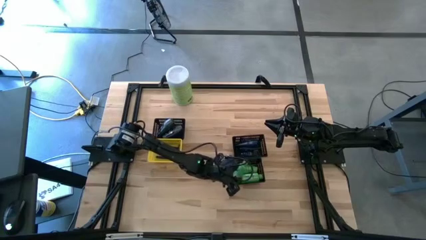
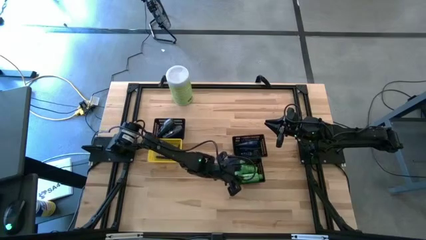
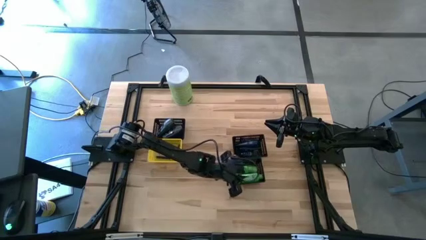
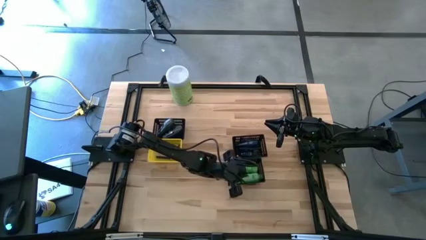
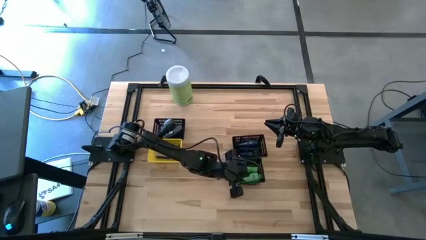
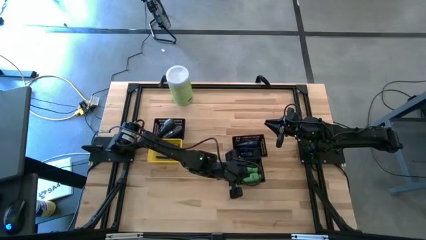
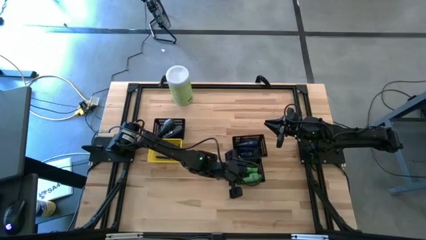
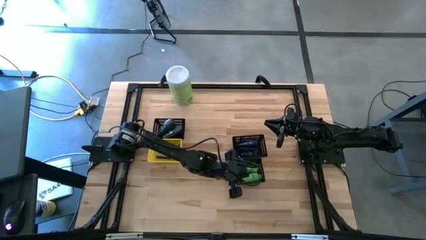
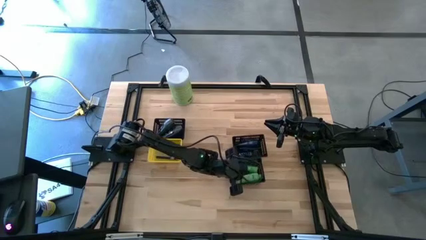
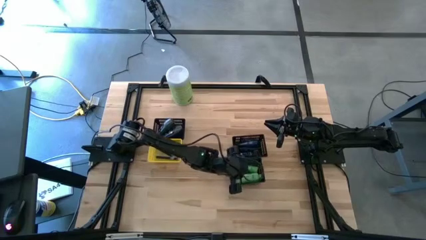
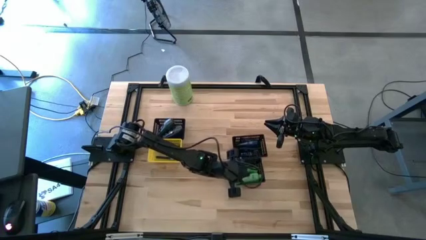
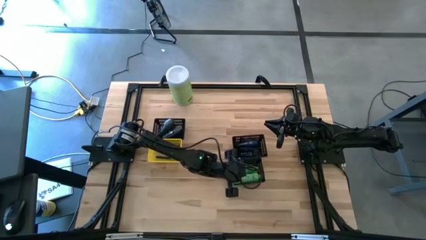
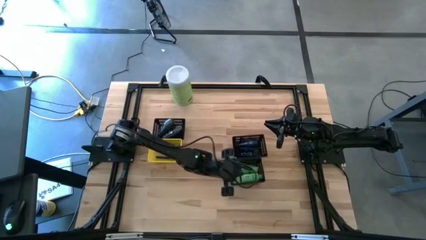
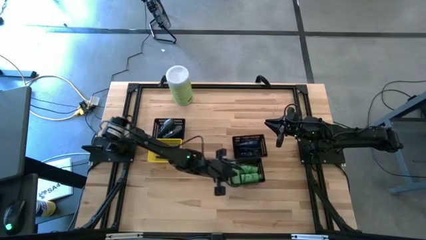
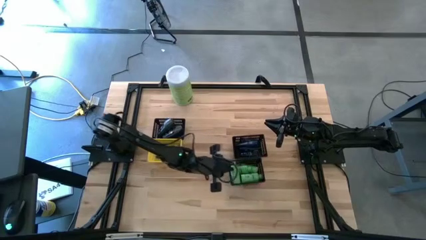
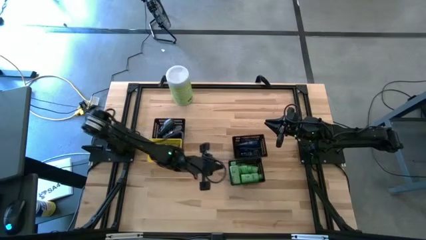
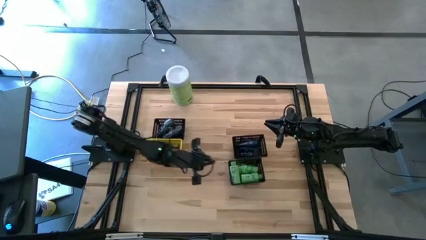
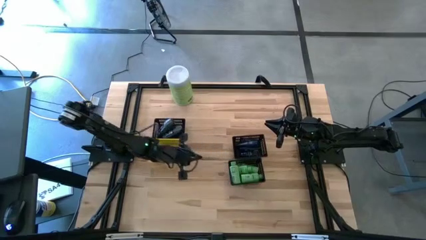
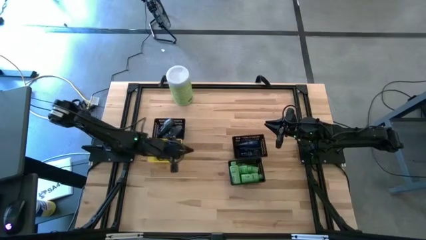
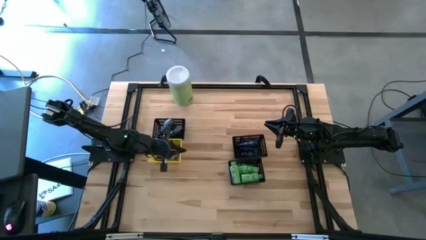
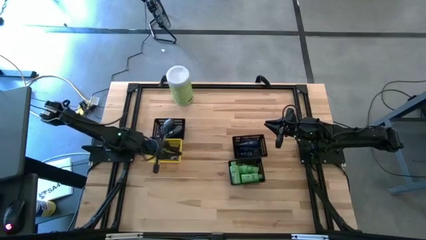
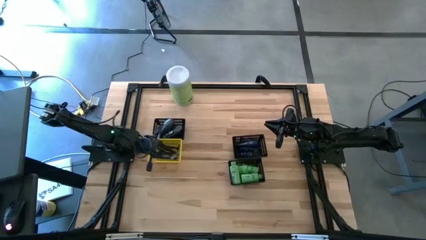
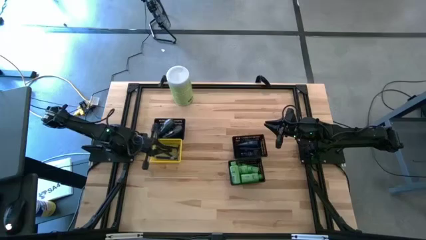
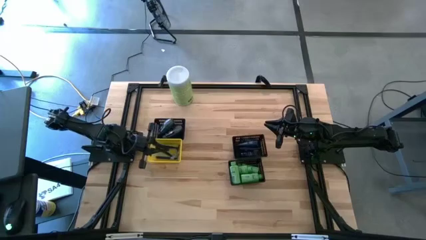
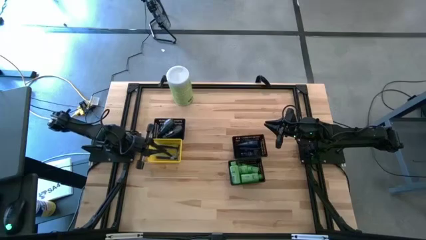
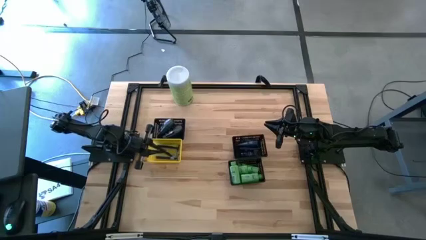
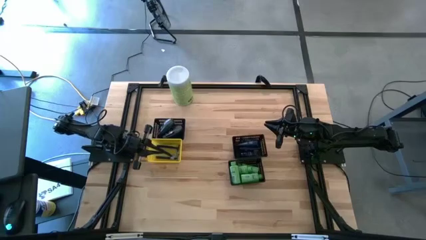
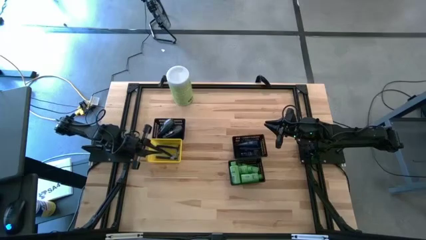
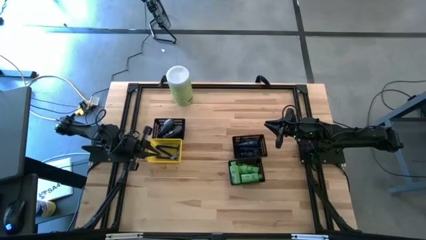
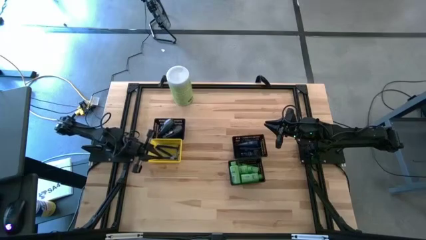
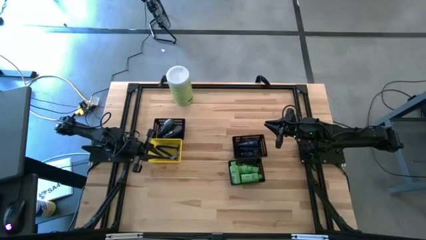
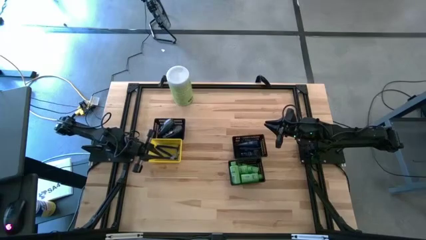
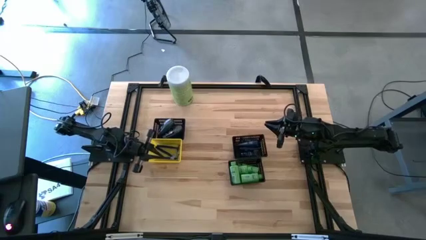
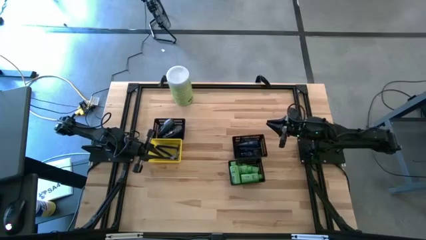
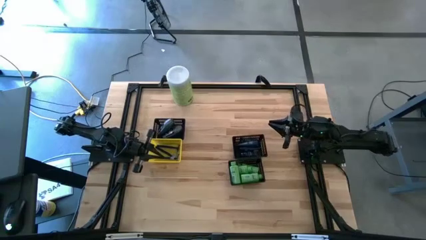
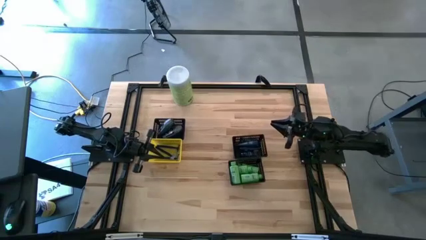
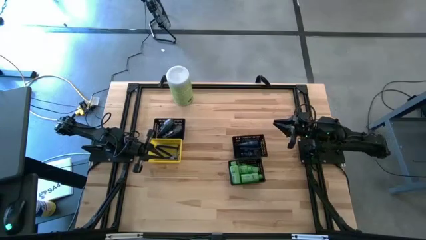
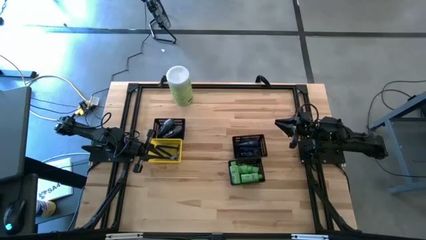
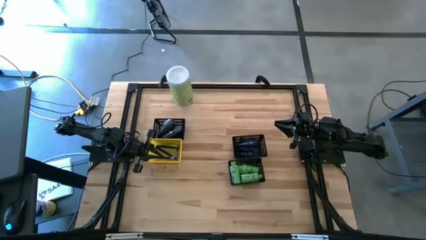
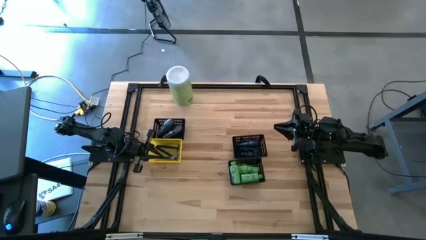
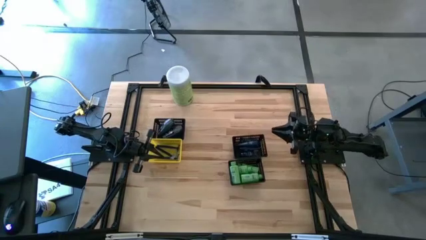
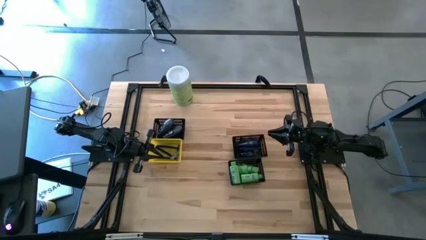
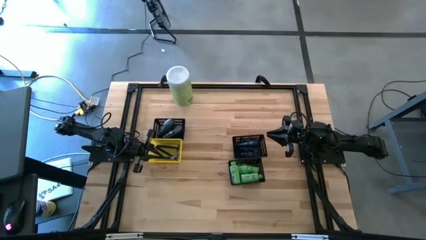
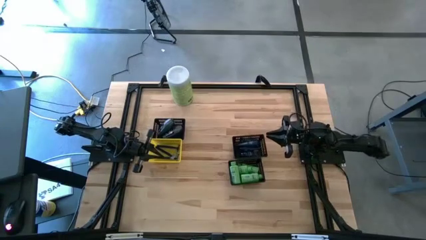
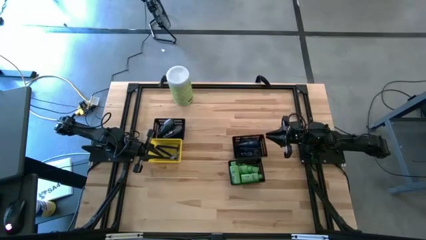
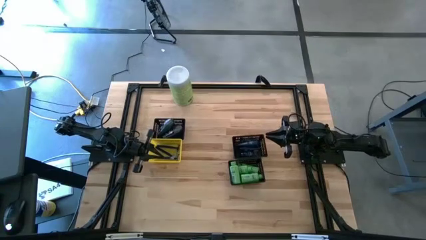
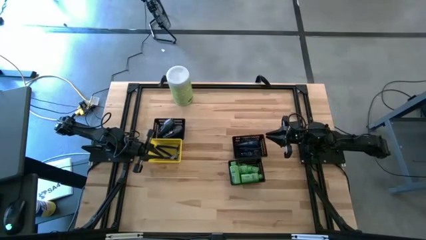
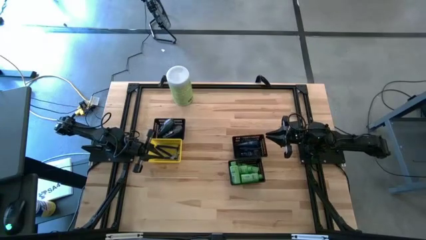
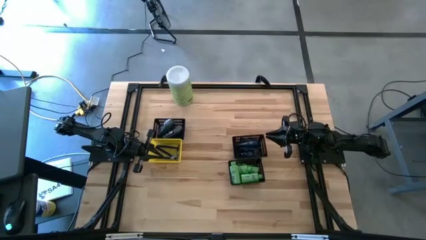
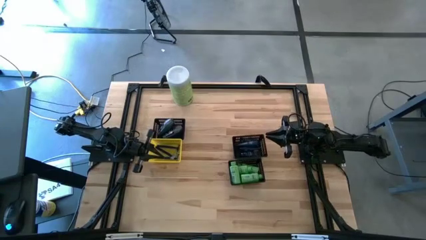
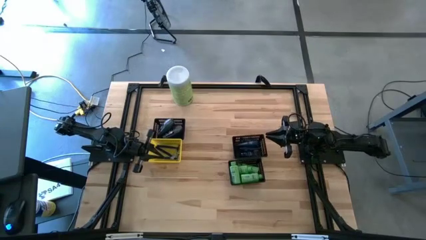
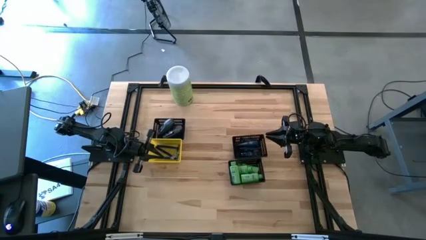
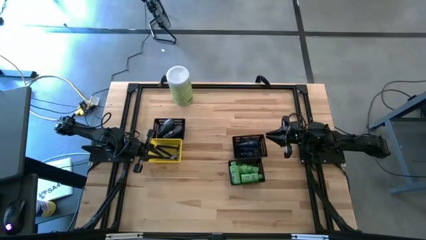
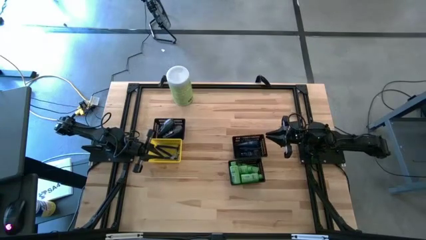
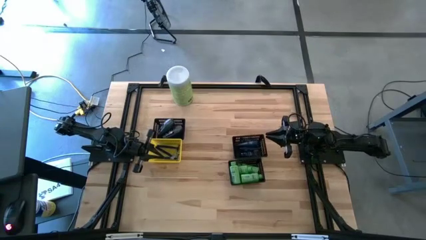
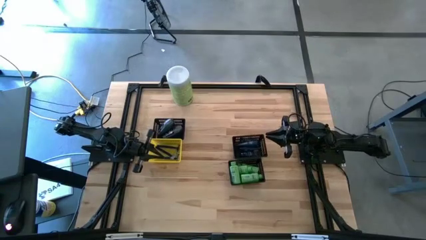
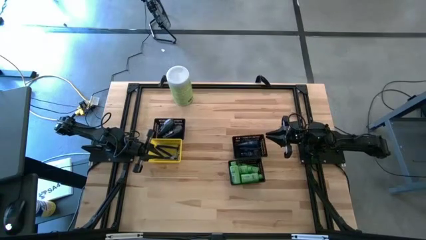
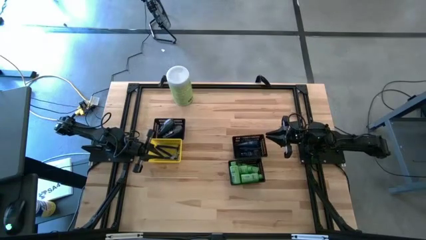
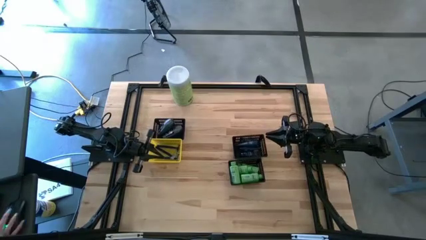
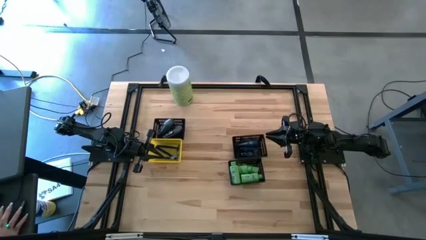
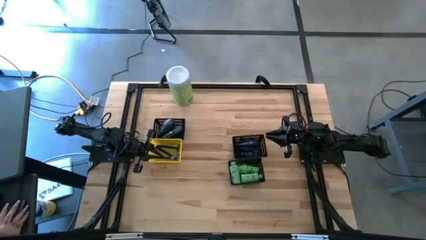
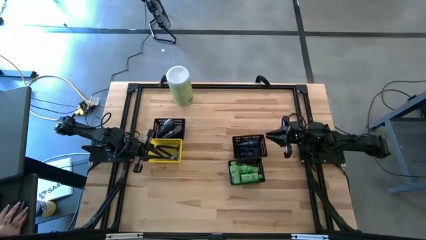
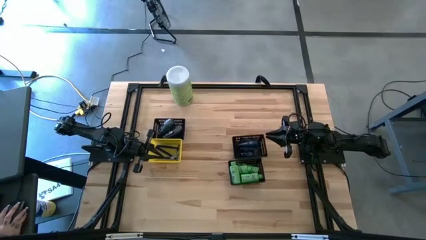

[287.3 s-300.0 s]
Task: Pick & Place Travel size toiletries
Return to Home Position

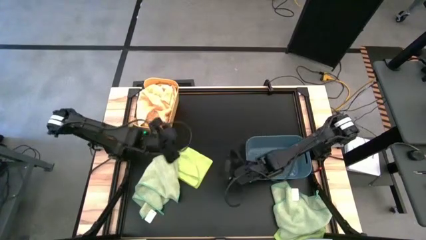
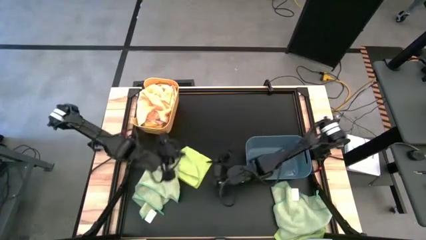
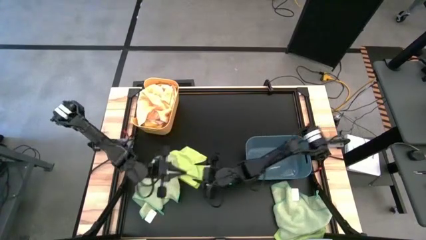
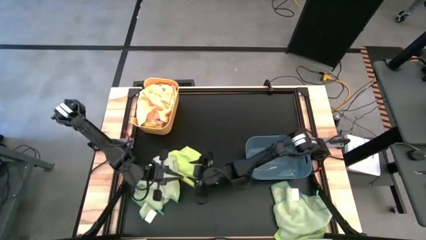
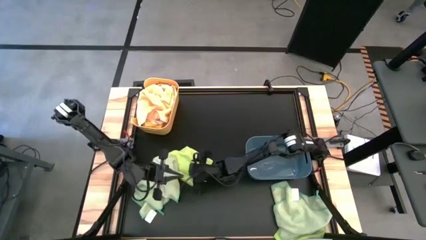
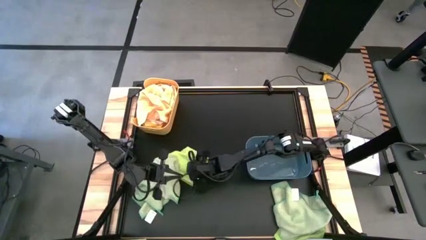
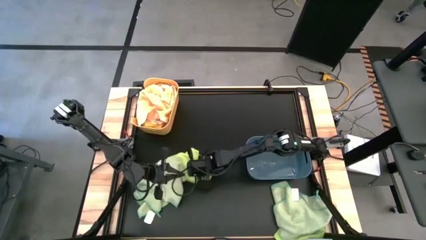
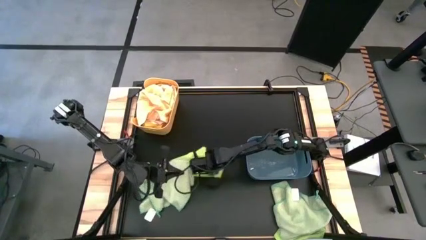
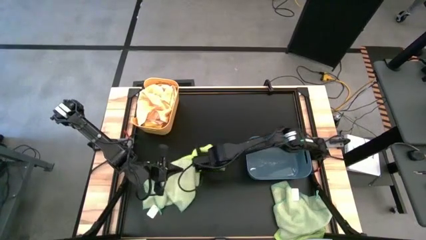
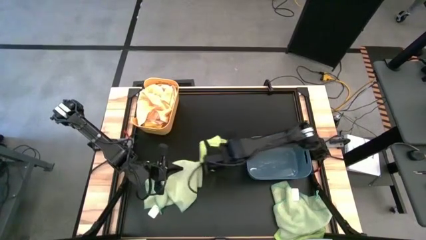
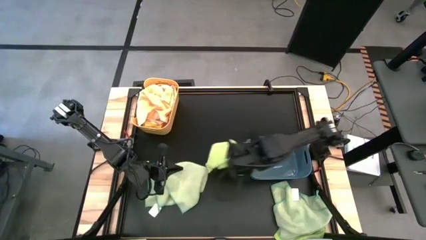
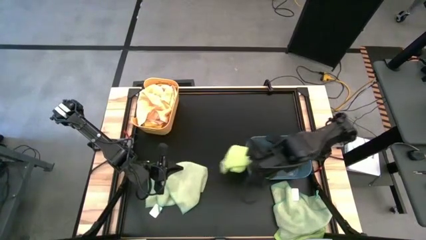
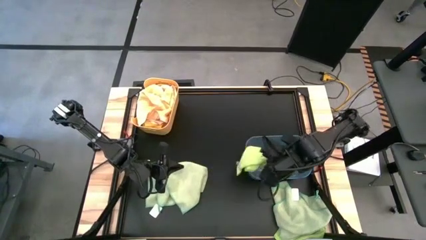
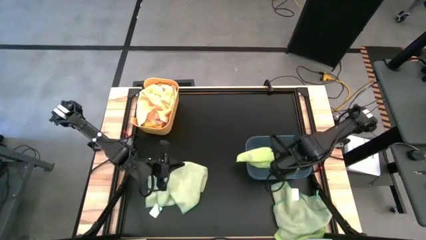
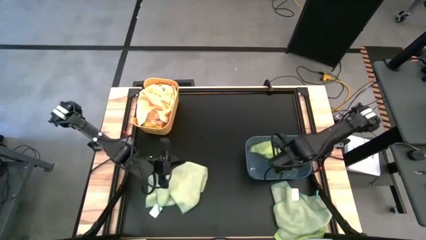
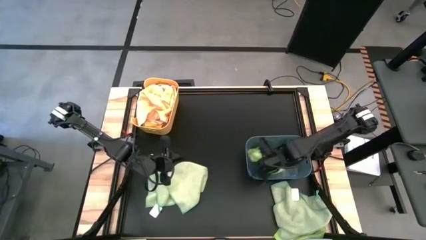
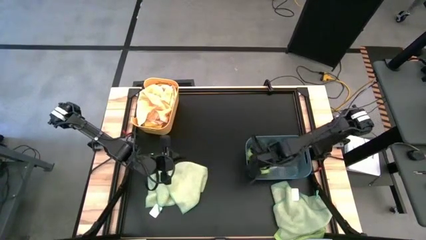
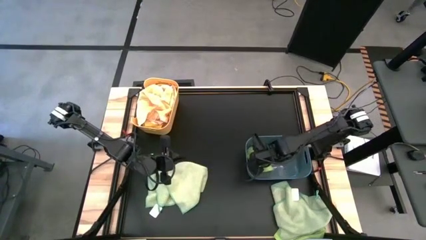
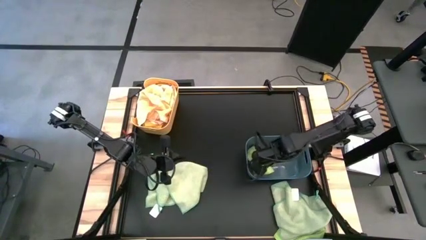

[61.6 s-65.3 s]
Task: Sort towels by color in basket
Put the top green microfiber cloth into the blue bin
